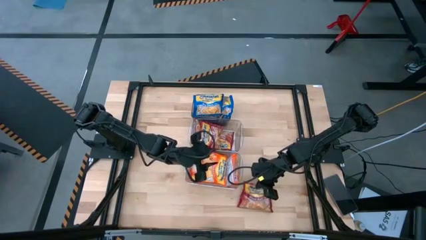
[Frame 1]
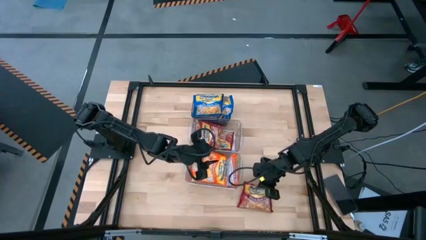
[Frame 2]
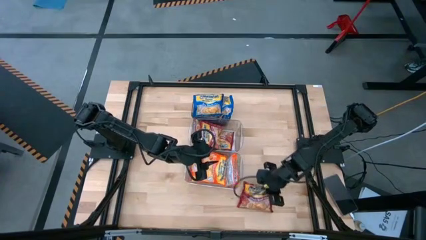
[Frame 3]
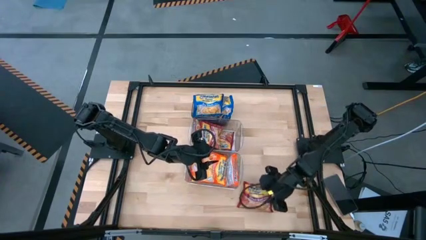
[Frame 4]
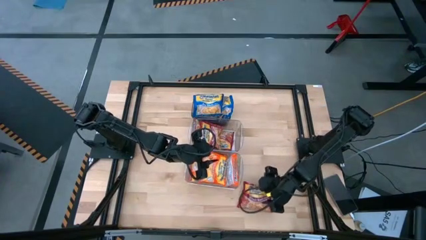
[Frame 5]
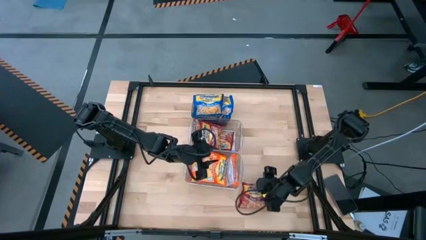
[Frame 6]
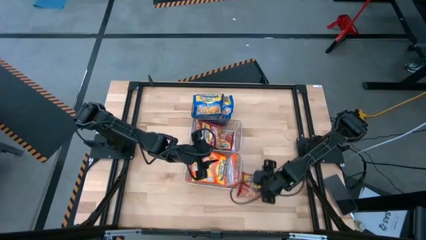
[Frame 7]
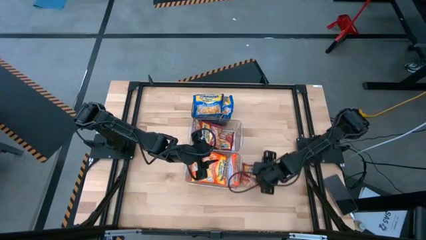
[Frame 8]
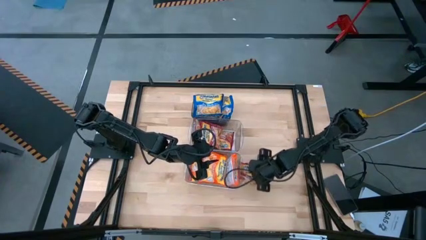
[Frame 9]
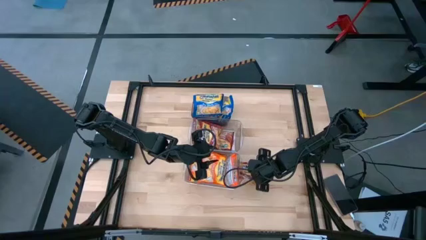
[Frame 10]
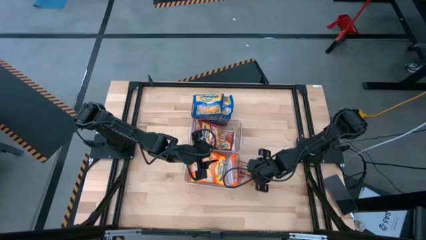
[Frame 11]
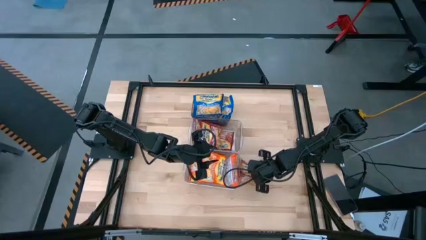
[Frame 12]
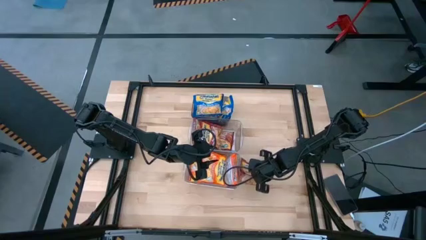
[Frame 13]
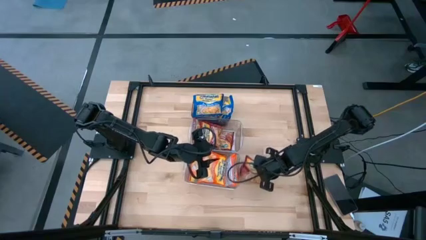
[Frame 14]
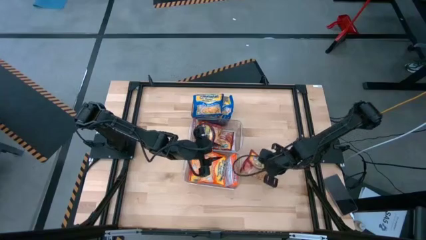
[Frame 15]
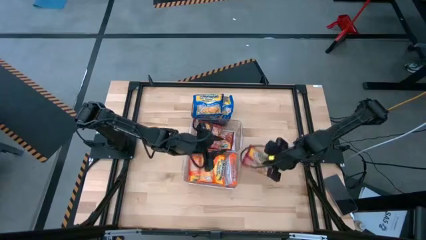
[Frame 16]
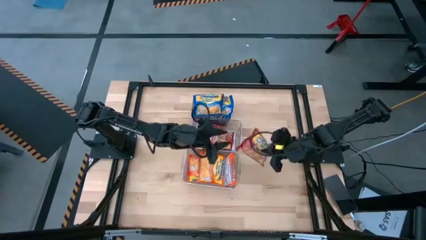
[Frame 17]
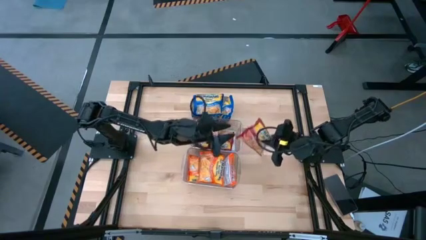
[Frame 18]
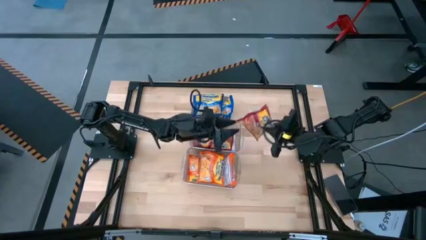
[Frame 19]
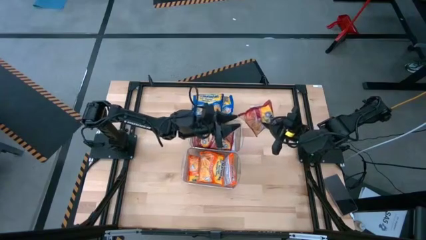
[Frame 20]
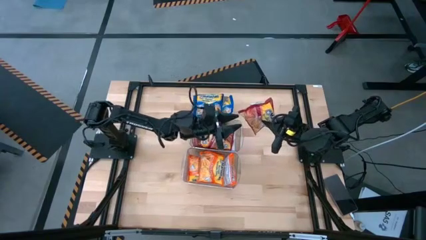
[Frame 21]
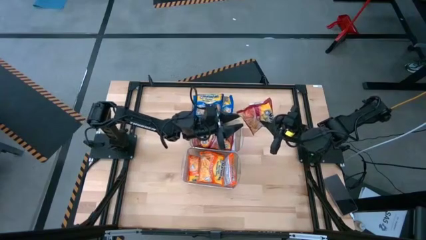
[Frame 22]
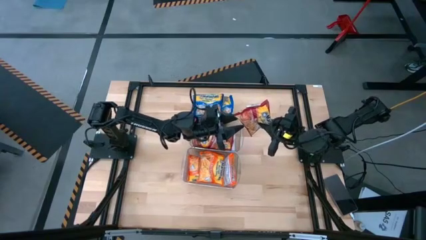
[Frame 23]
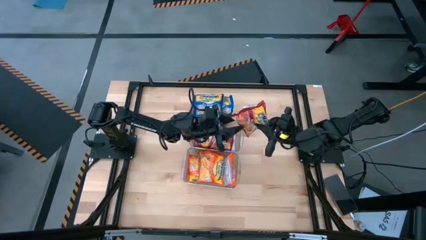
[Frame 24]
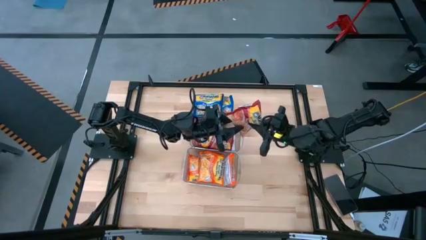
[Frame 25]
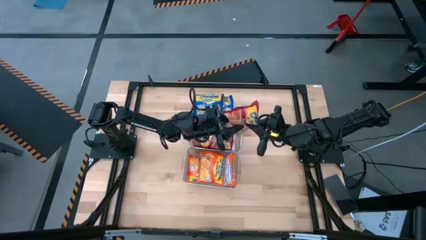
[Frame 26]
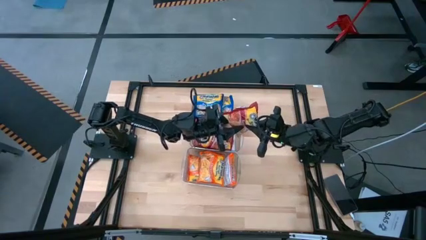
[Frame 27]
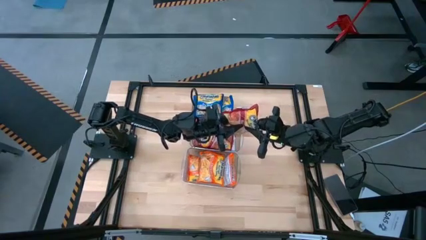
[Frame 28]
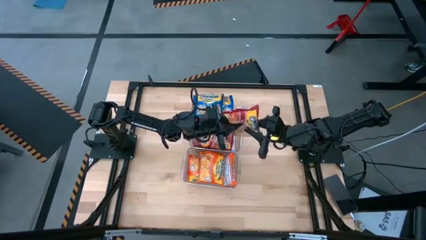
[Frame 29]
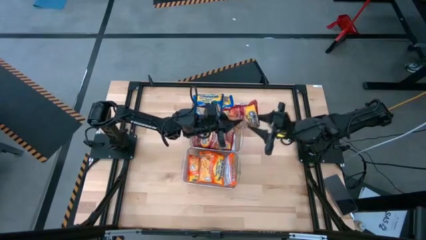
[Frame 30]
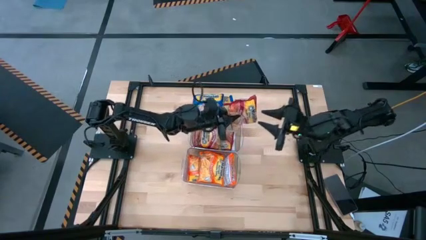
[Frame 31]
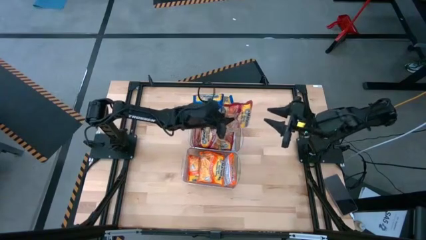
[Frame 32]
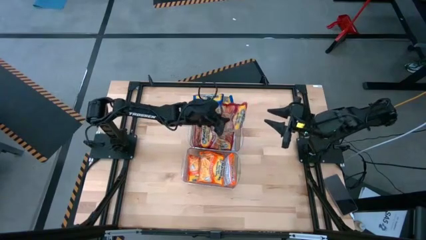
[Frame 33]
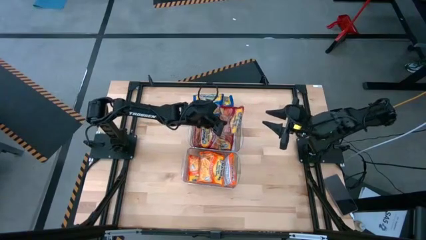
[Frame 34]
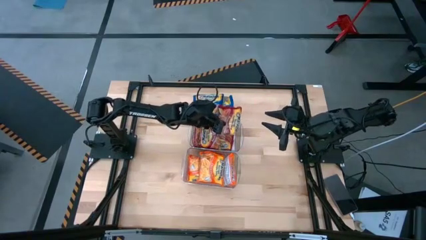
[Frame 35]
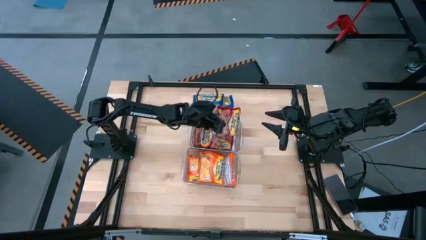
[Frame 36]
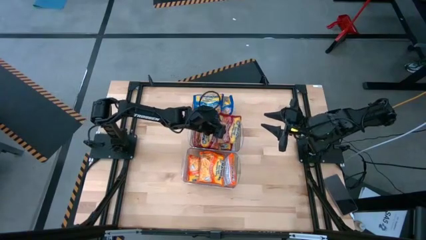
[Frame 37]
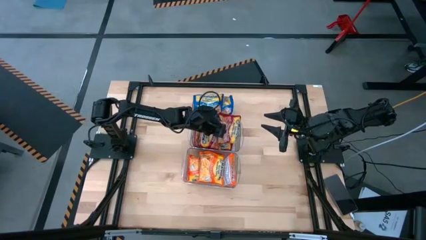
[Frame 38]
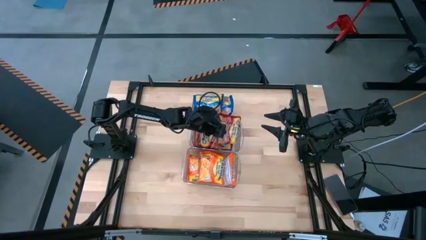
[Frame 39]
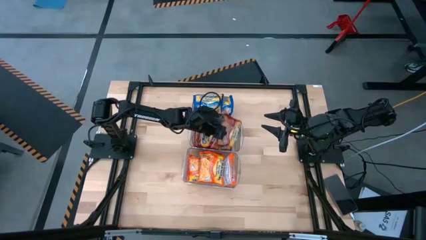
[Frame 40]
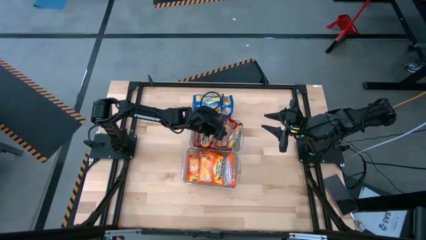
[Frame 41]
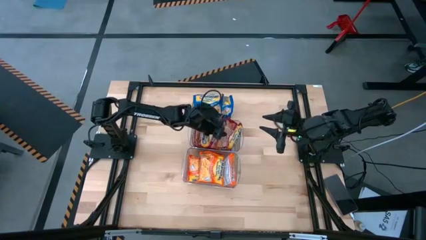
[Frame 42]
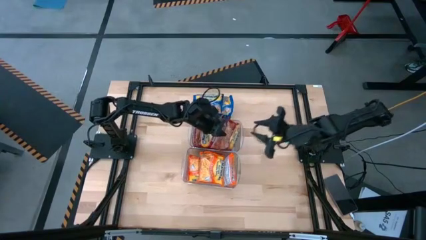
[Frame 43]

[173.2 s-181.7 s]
Task: Sort Maruchan noodles
Put the red noodle pack into the top transparent bin

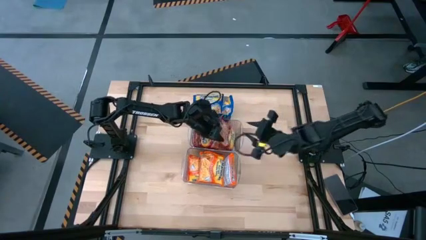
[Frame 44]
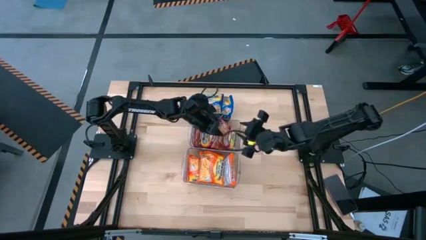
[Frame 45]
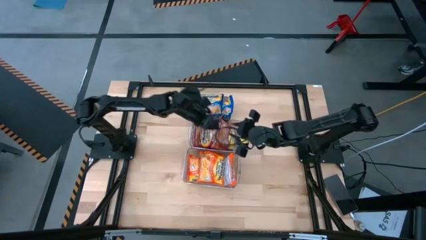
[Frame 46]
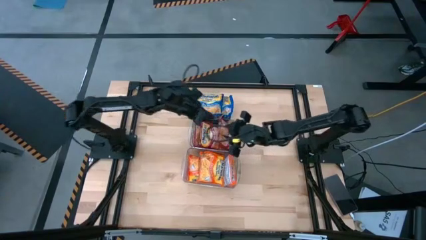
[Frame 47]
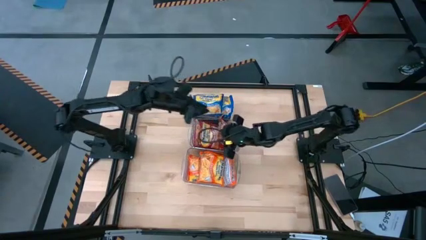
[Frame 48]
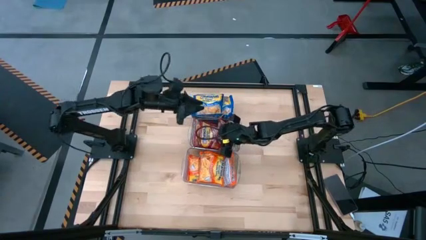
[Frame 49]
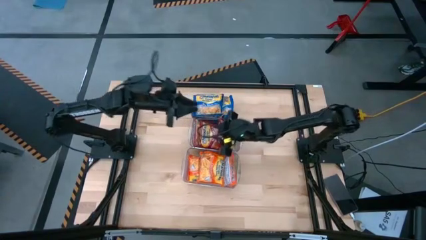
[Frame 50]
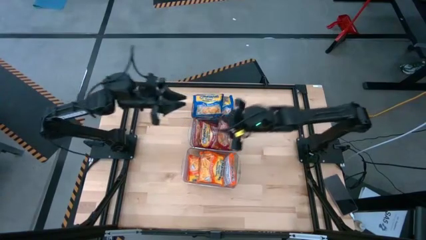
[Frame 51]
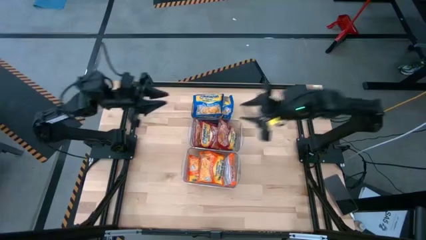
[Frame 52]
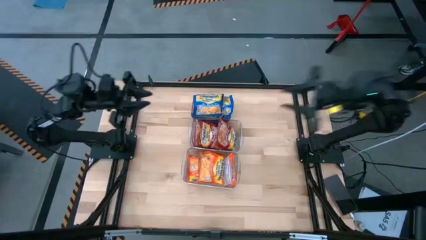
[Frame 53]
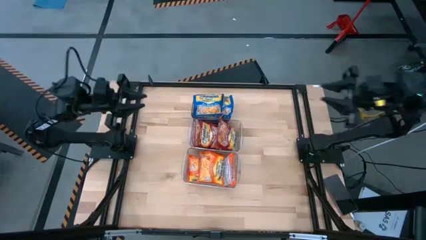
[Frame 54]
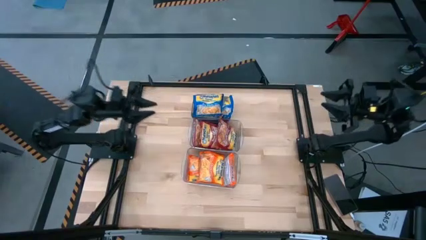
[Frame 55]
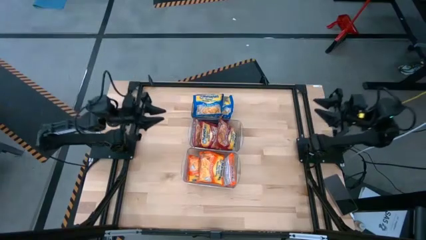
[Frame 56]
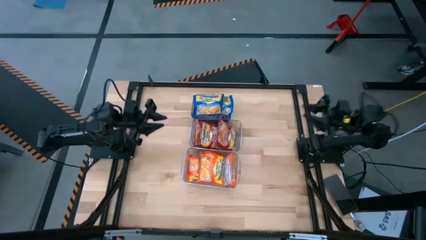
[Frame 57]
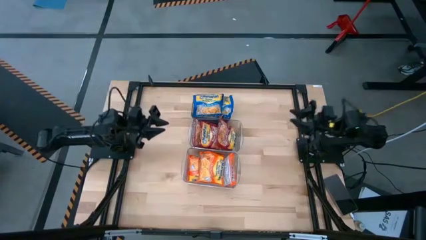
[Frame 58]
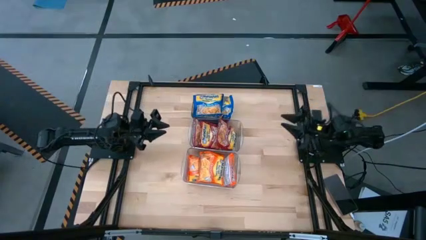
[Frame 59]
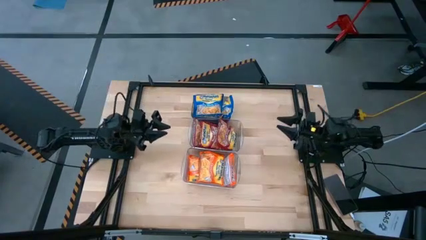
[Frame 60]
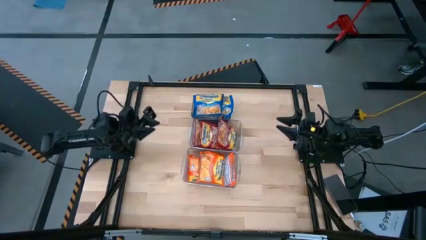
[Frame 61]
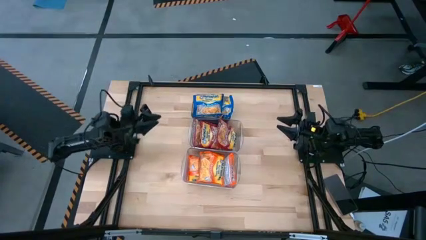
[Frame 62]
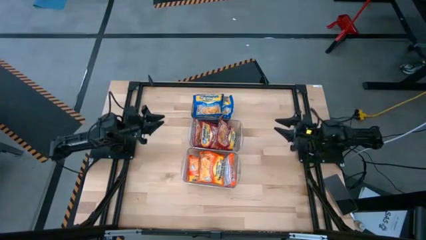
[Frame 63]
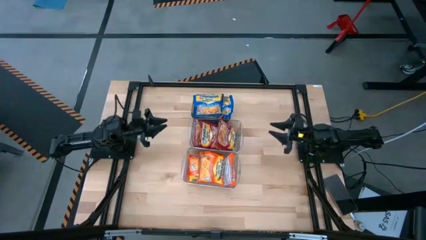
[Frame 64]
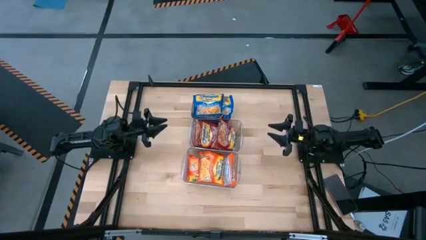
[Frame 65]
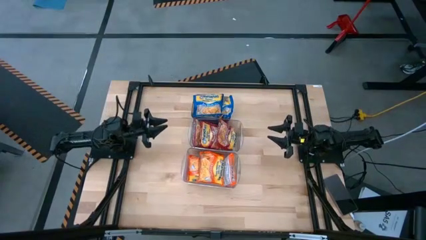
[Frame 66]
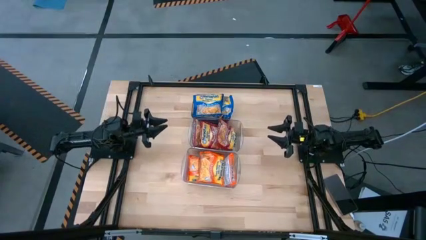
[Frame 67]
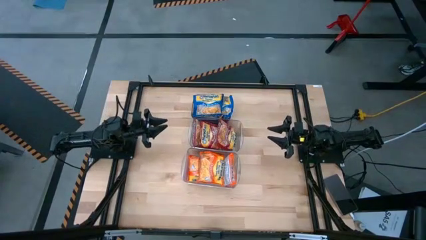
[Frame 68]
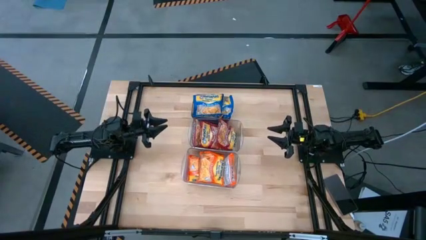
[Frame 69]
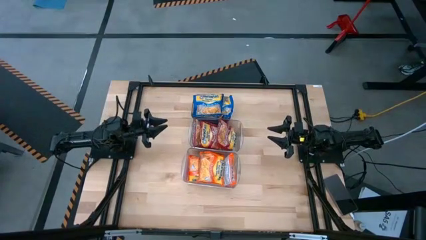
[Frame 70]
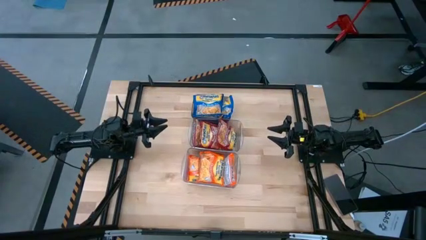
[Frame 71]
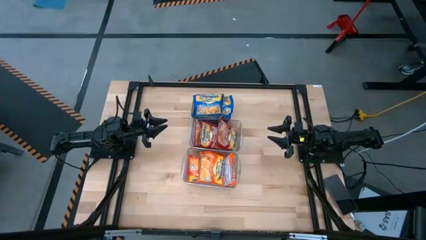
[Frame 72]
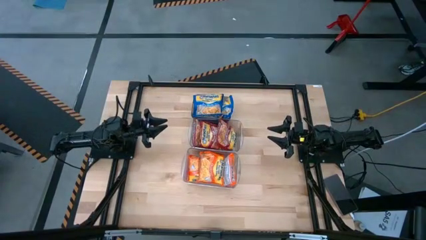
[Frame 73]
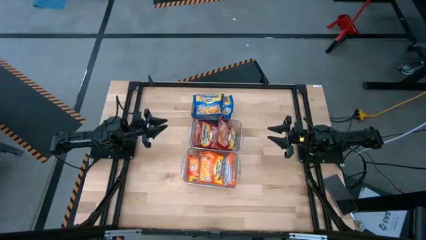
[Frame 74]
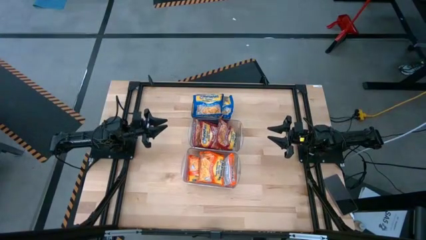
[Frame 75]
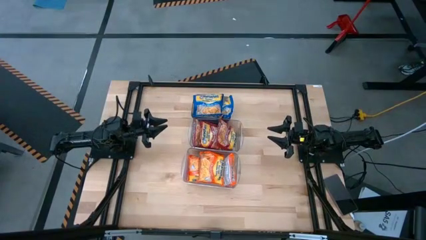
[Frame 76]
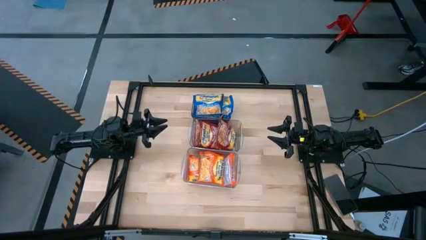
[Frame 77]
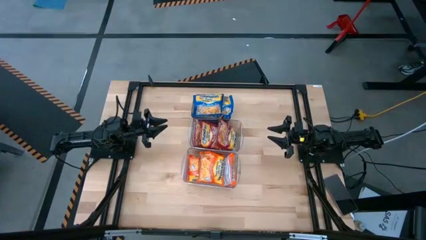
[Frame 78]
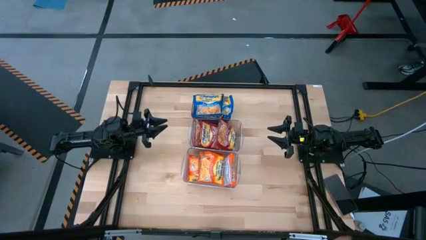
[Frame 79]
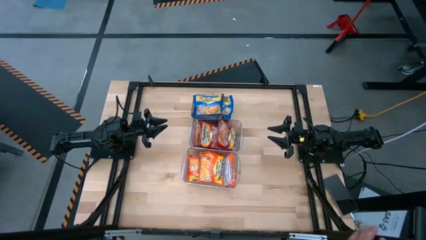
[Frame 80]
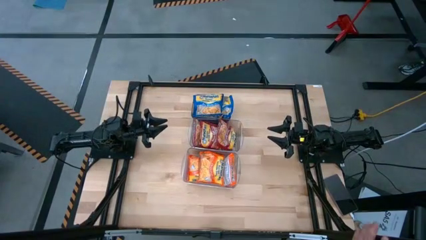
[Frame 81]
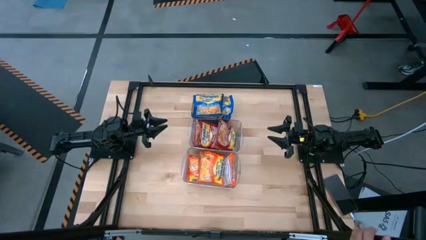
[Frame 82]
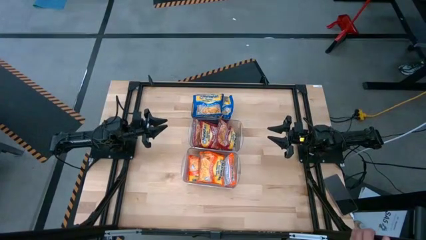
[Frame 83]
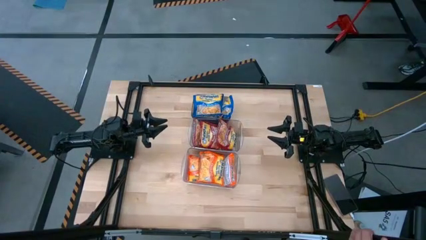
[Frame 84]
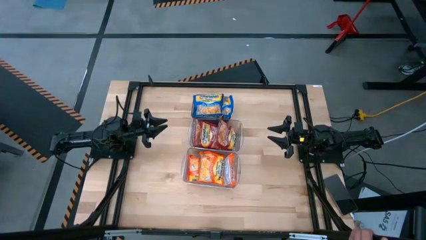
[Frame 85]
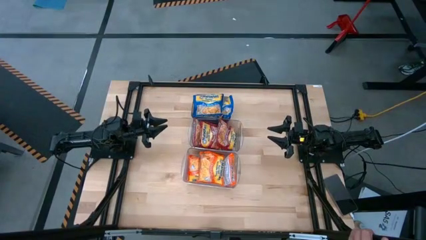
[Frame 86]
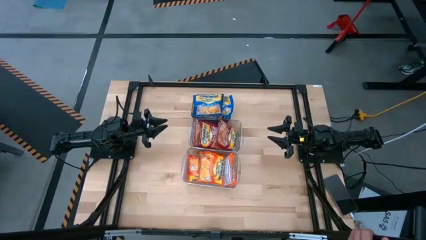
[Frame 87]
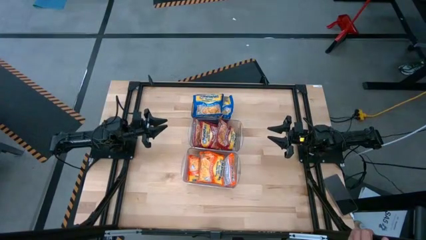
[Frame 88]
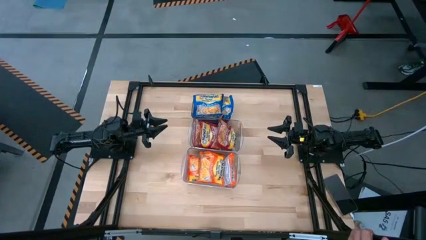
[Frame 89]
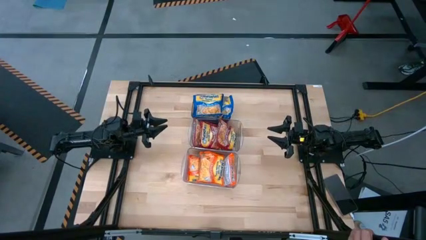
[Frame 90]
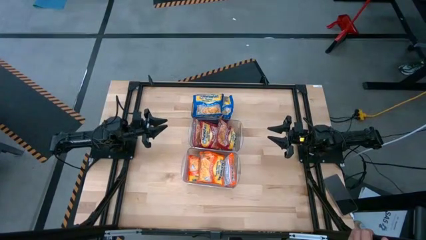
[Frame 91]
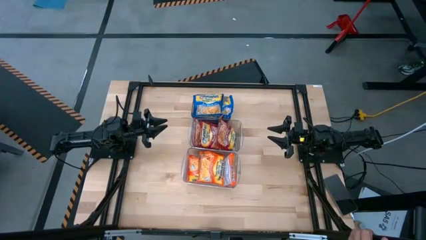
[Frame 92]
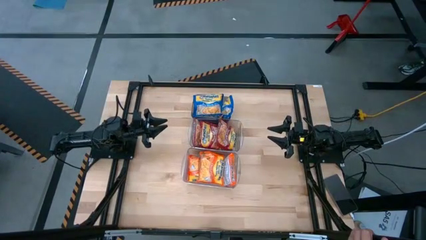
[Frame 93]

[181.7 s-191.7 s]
Return to Home Position
